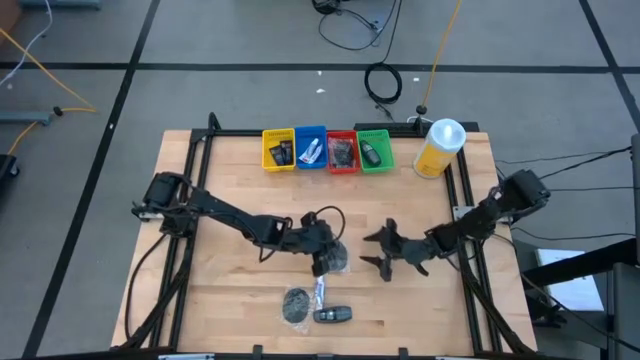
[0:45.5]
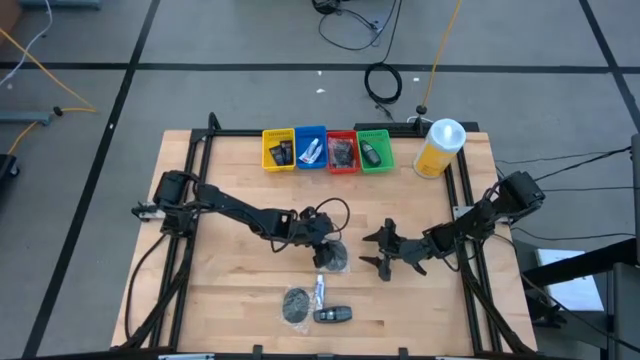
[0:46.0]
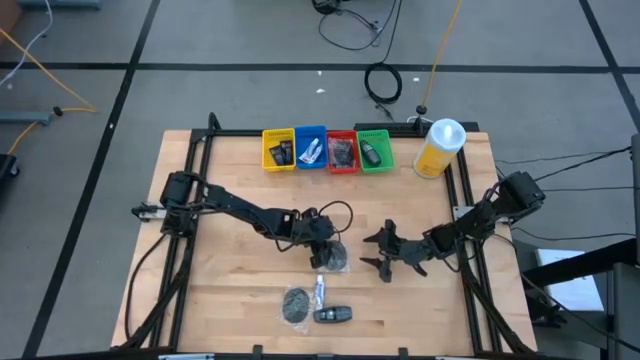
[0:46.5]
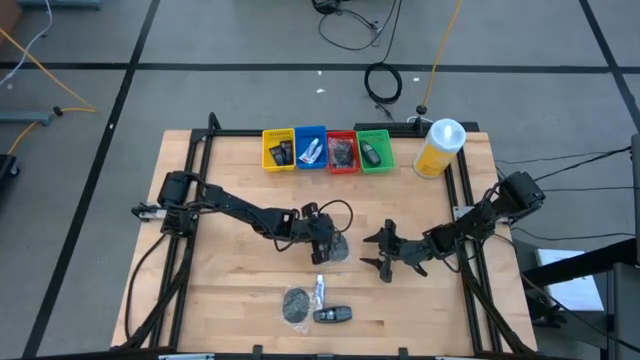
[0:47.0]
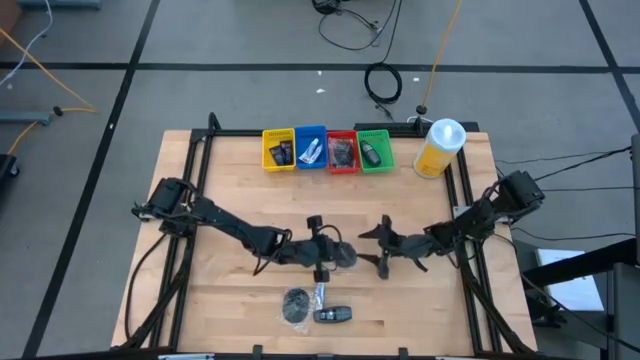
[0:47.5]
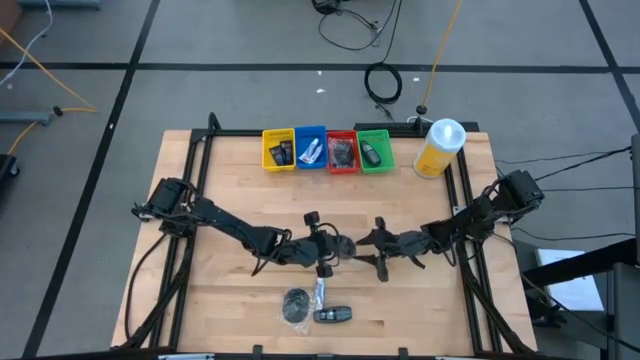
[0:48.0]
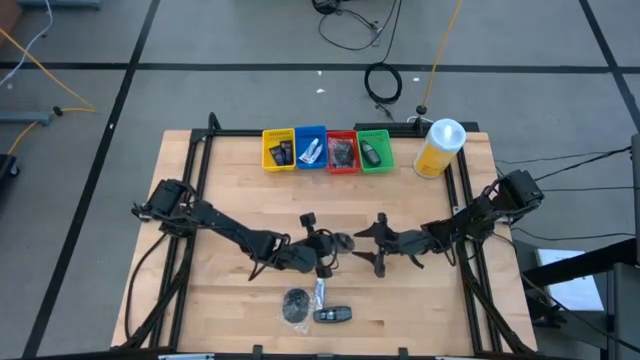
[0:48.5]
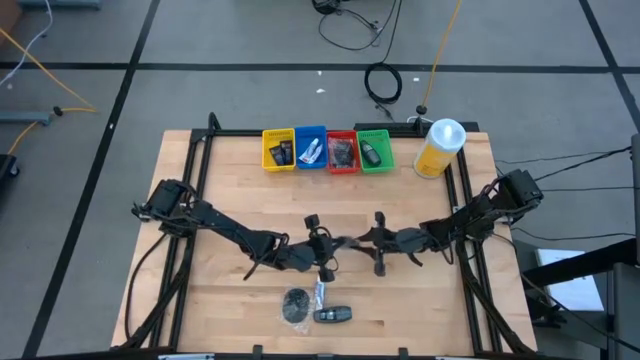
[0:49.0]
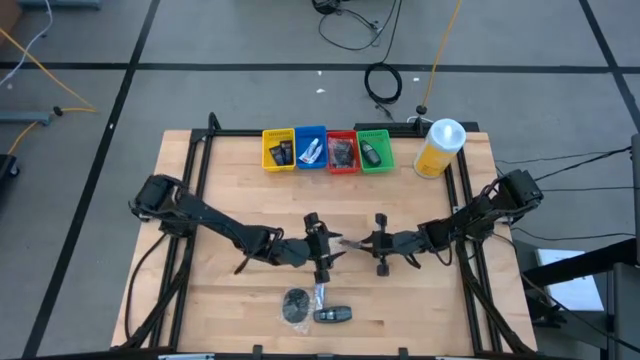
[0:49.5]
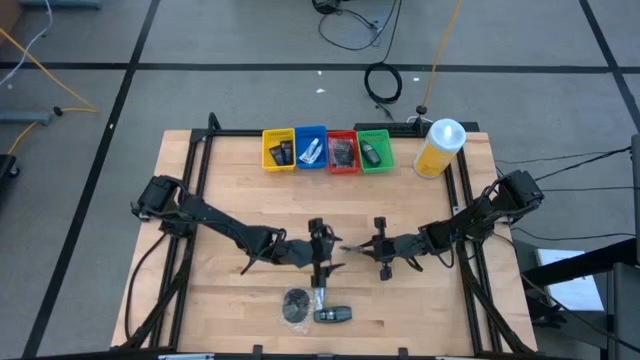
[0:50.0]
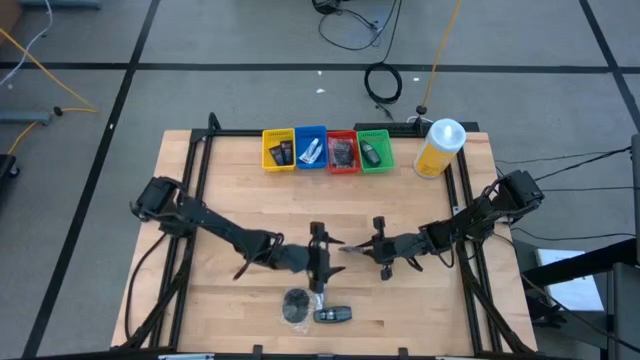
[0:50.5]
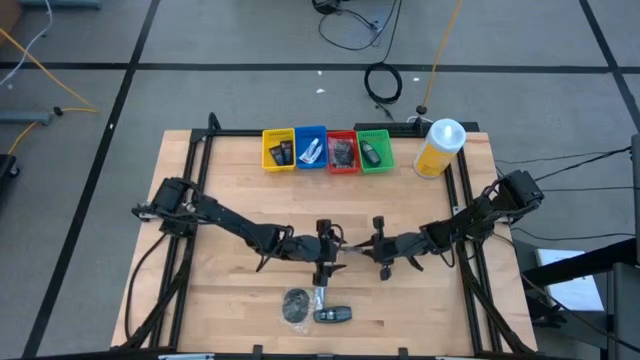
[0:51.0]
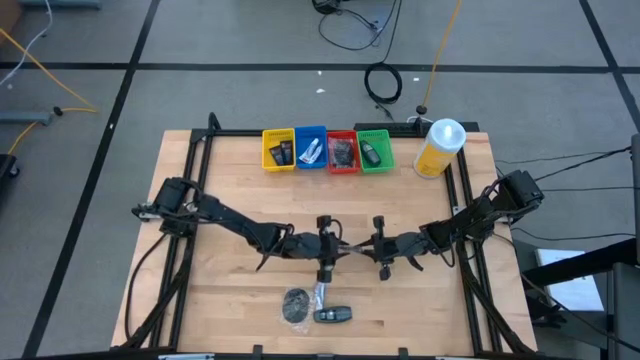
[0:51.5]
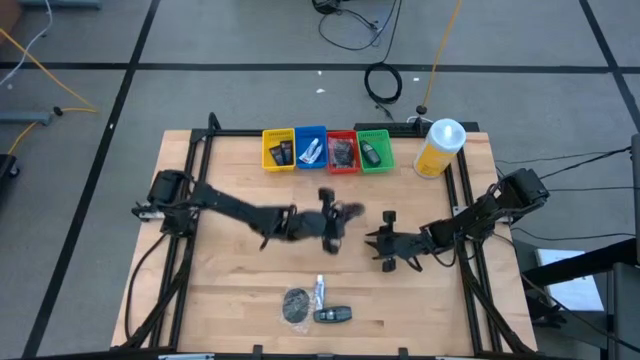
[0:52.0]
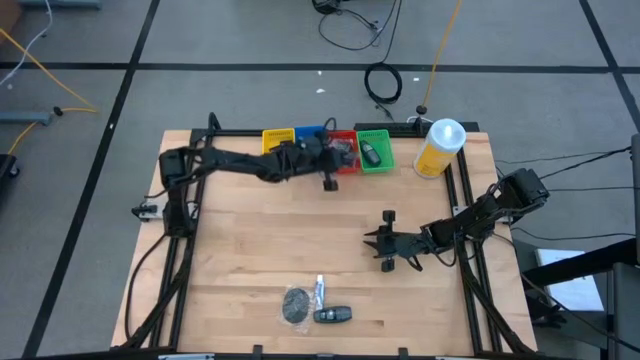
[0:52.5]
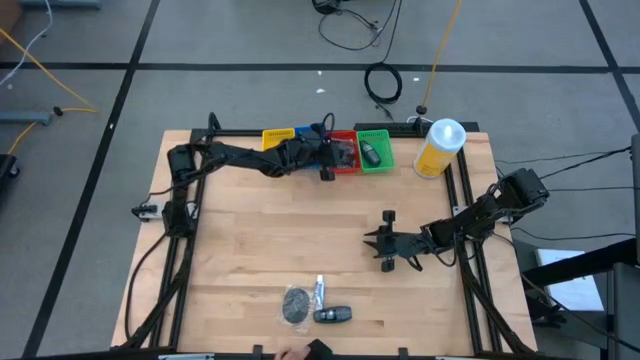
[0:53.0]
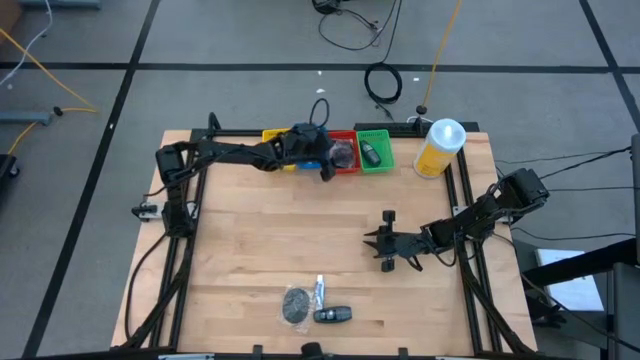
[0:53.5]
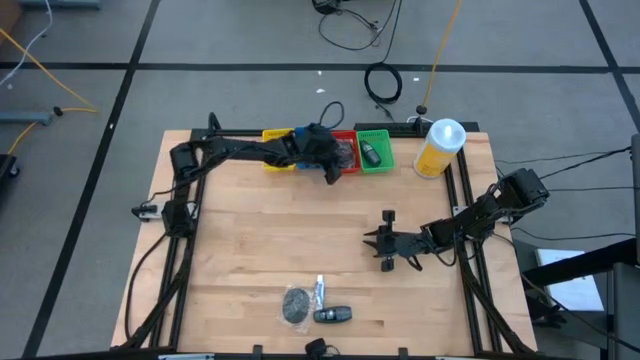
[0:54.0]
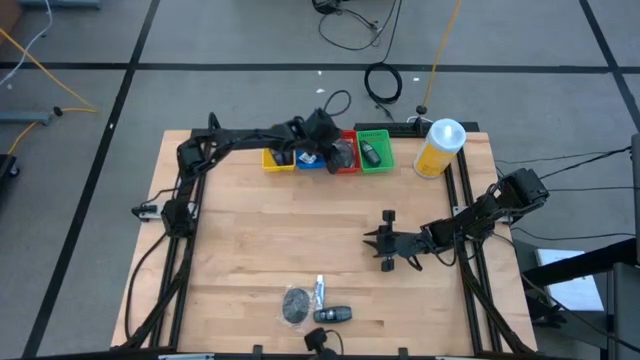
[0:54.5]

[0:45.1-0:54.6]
Task: Pick & Place Travel size toiletries
Put the black hairbrush into the red basket

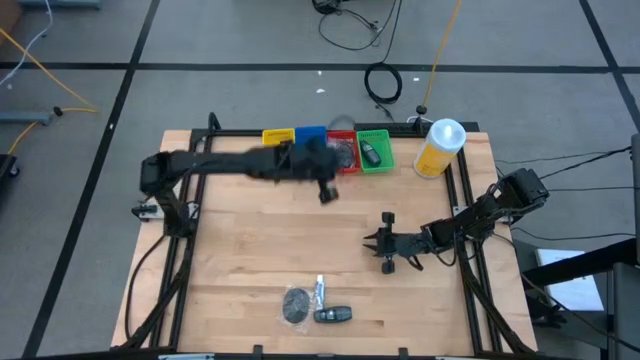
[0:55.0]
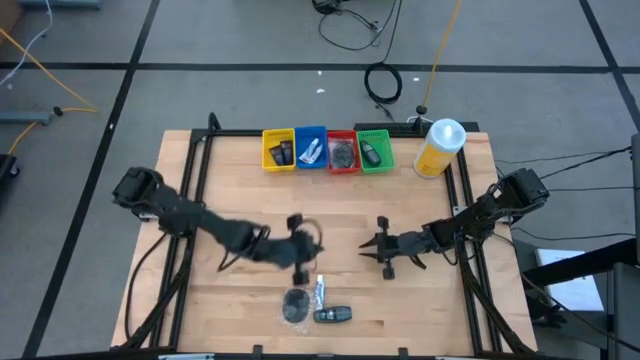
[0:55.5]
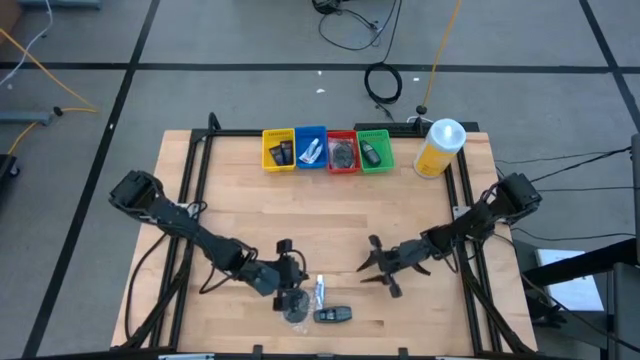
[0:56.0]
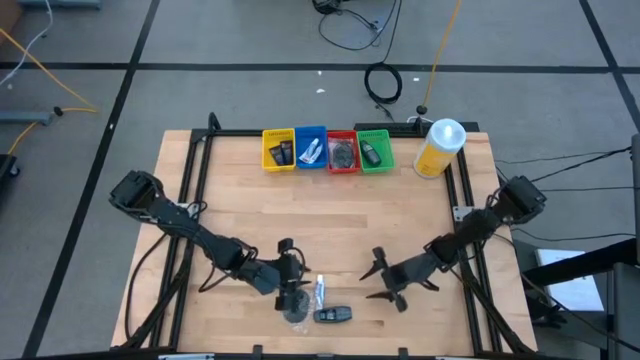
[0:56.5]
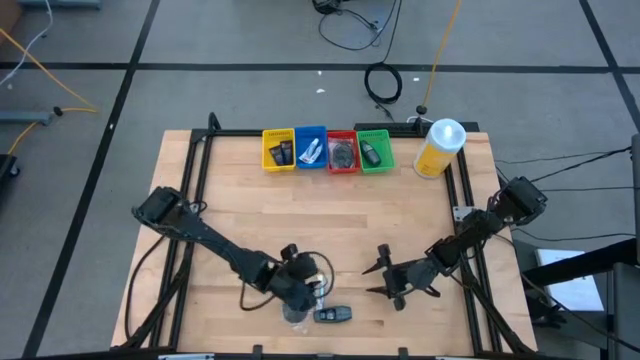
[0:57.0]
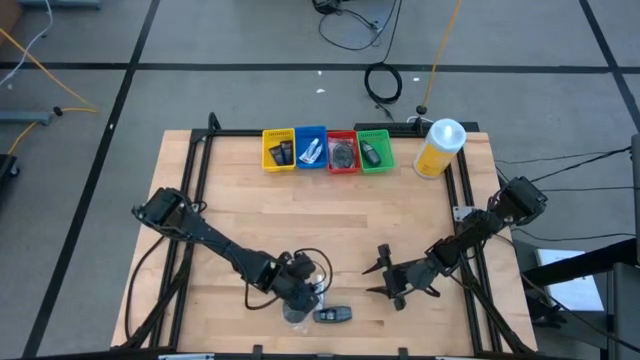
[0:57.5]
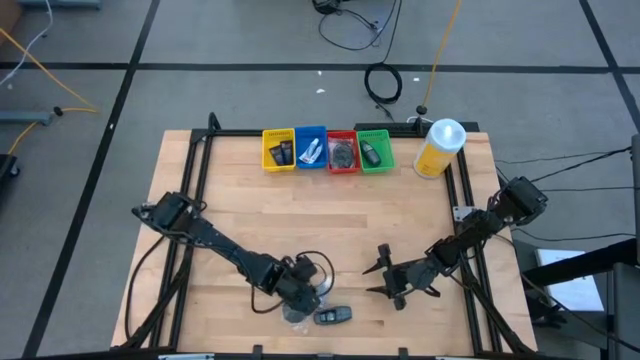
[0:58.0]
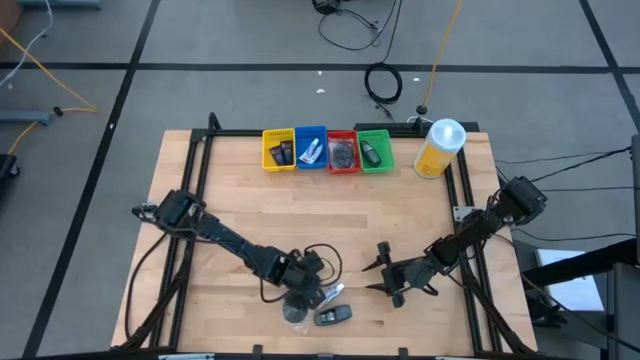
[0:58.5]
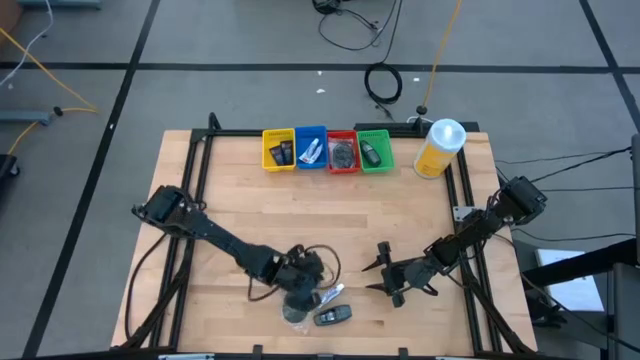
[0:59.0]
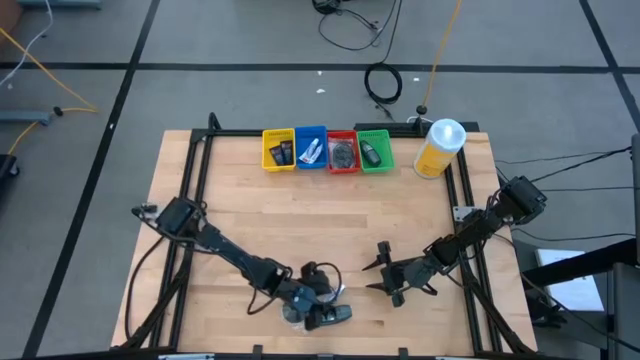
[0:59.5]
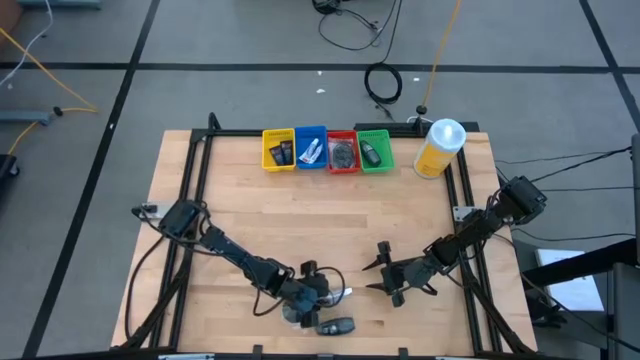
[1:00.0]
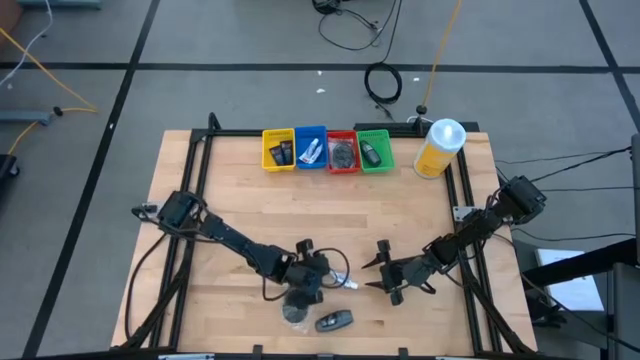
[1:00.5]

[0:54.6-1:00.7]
Put the white toothpaste into the blue basket

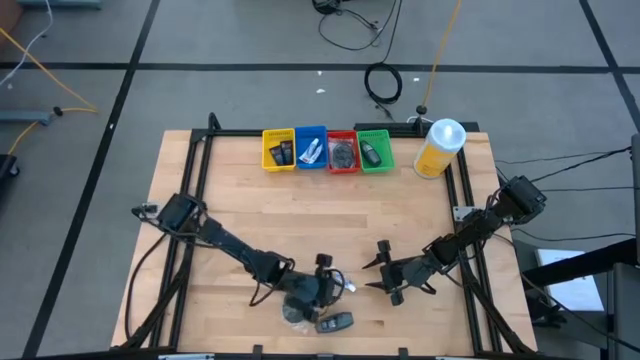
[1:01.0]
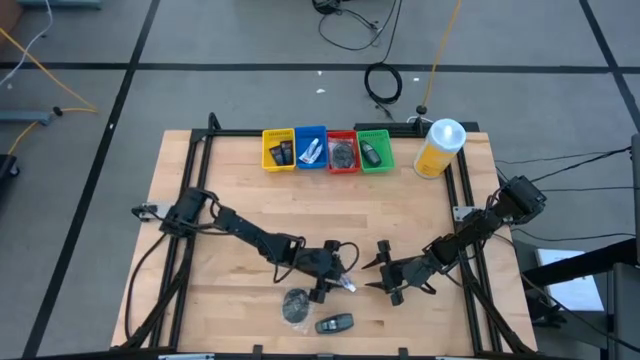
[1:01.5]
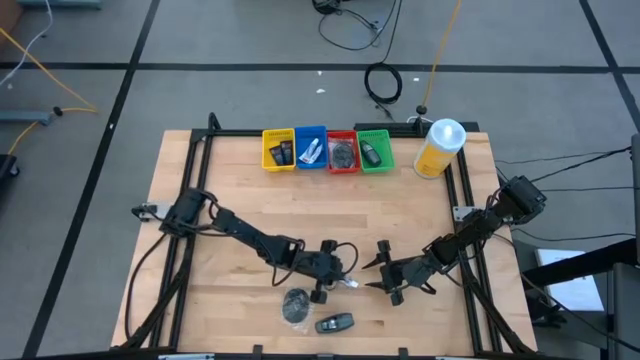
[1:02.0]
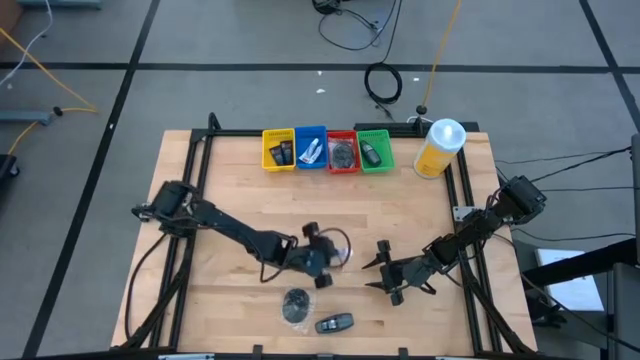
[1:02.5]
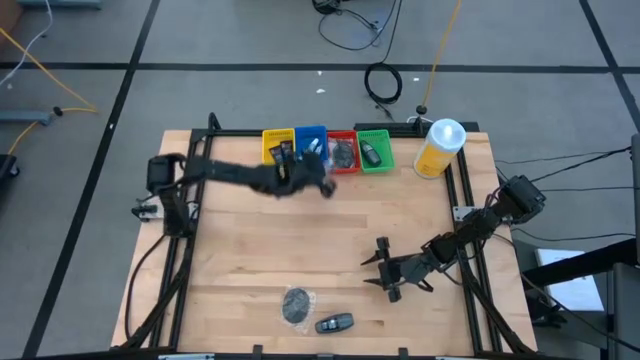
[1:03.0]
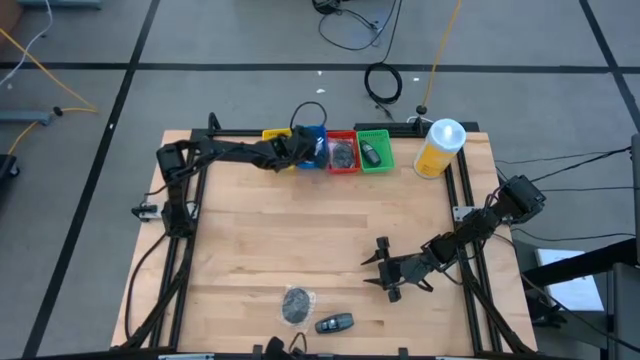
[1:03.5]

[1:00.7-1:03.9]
Put the white toothpaste into the blue basket

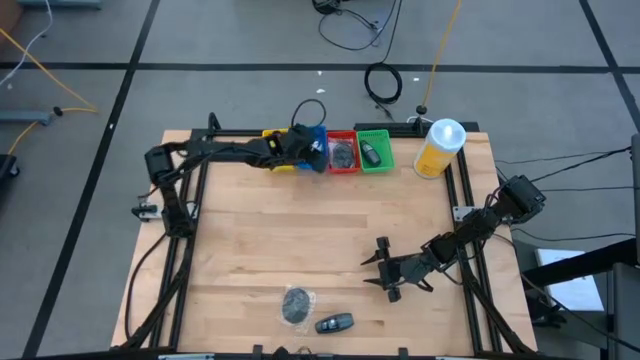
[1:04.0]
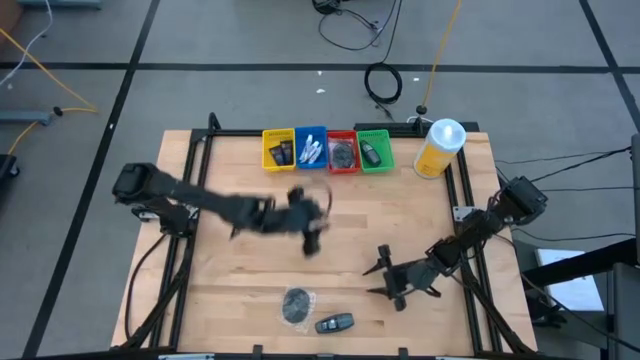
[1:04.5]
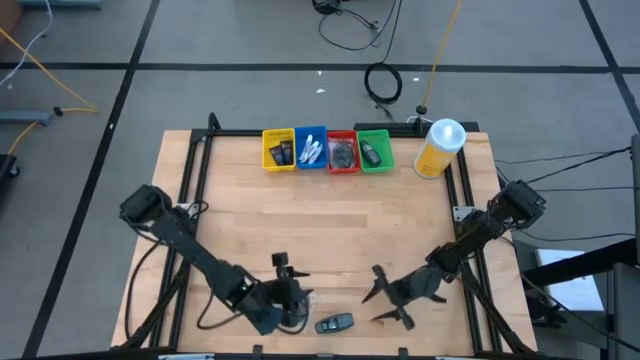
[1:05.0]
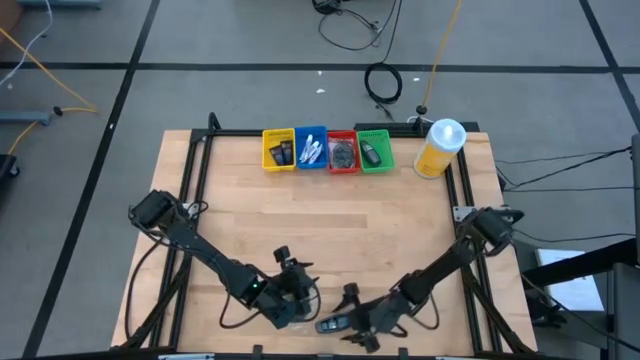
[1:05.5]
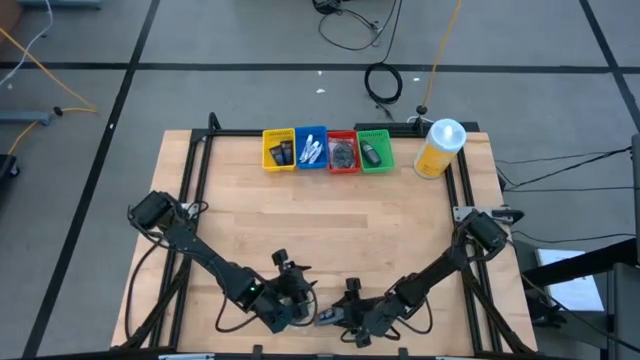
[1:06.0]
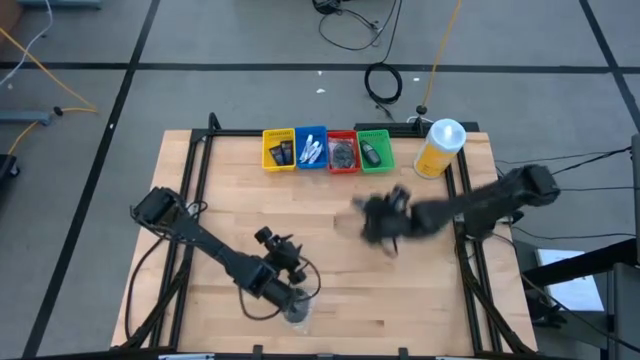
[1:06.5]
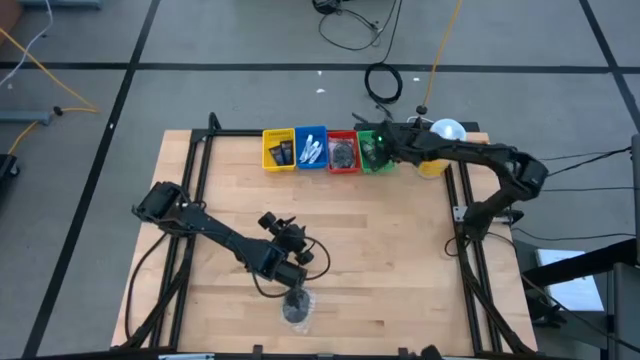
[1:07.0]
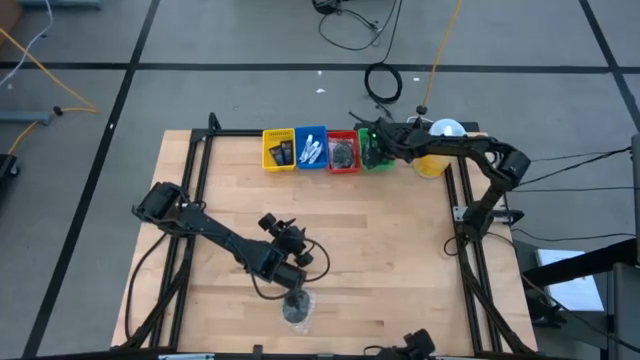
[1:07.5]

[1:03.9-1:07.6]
Put the gray deodorant into the green basket
